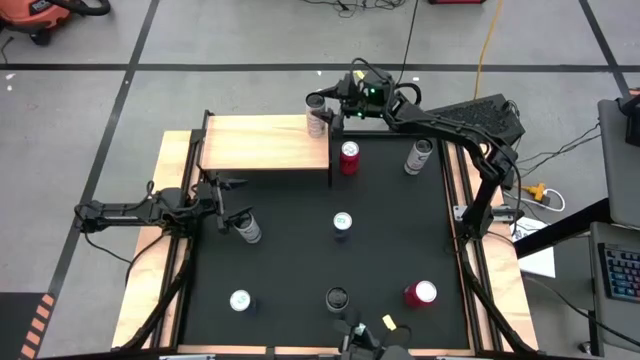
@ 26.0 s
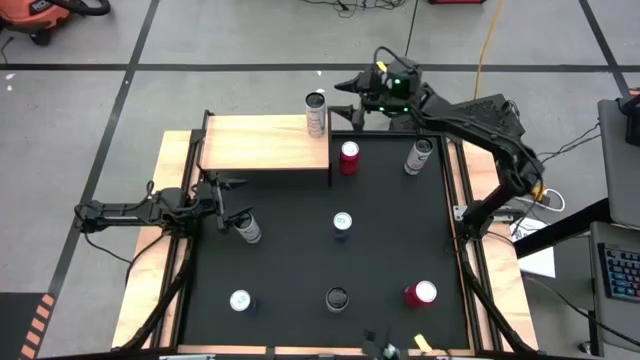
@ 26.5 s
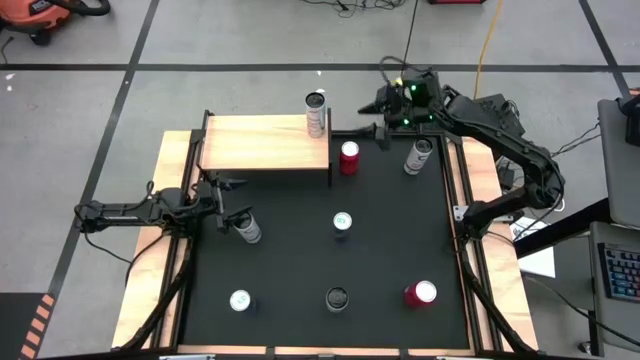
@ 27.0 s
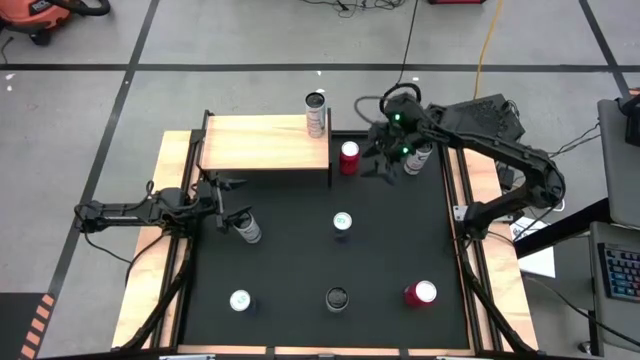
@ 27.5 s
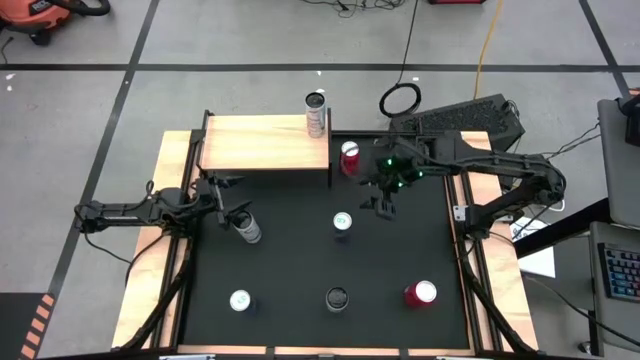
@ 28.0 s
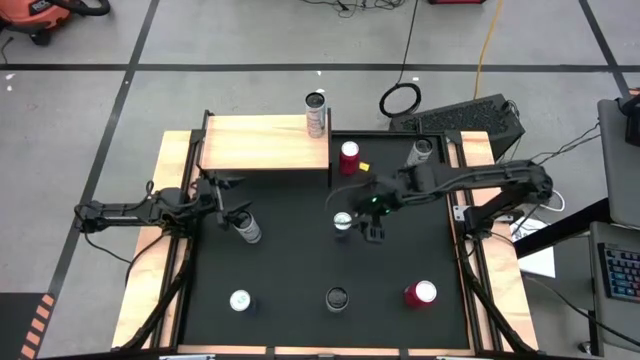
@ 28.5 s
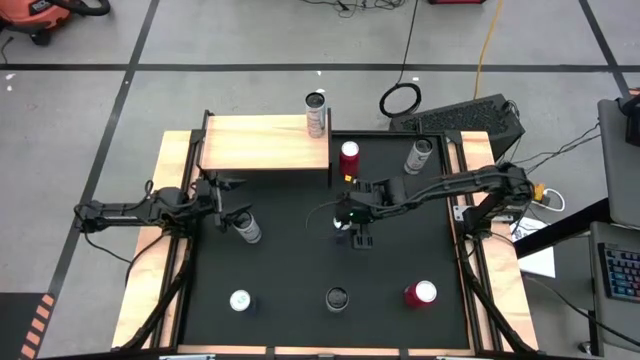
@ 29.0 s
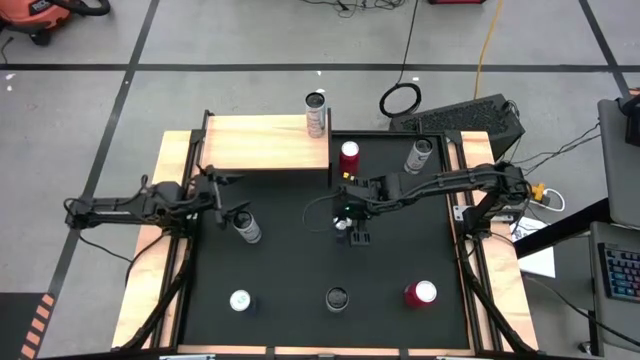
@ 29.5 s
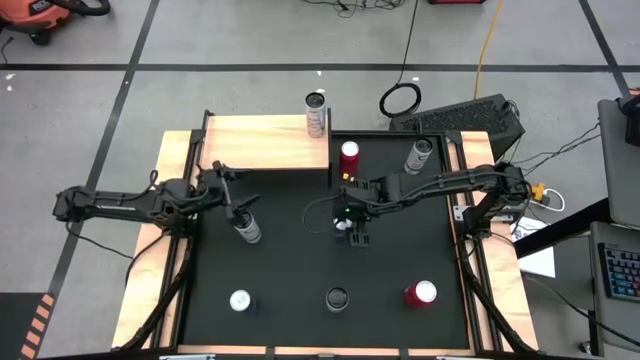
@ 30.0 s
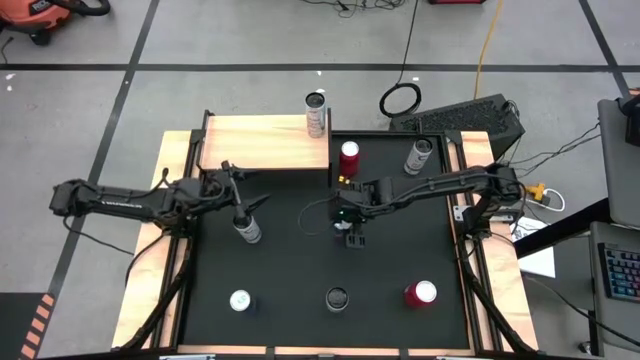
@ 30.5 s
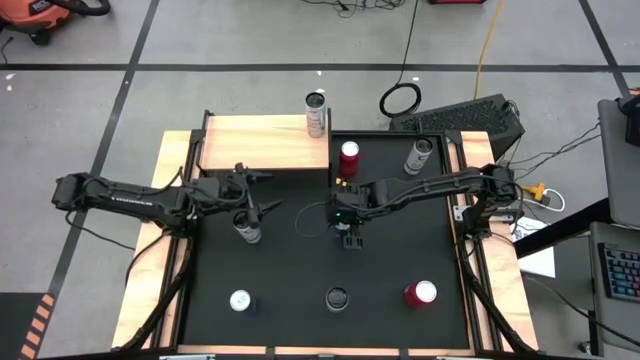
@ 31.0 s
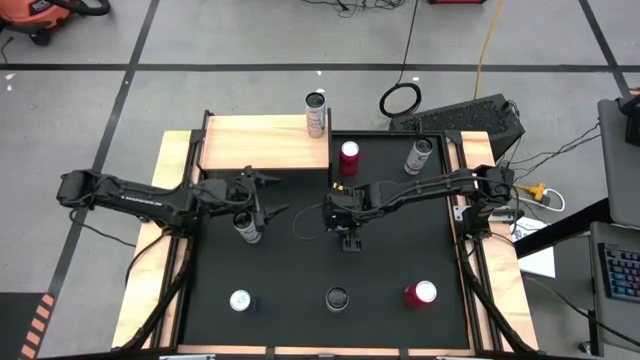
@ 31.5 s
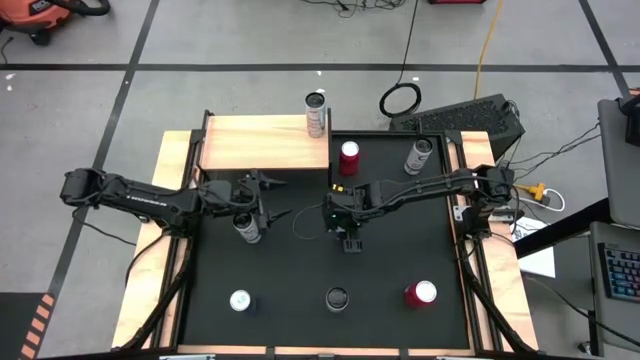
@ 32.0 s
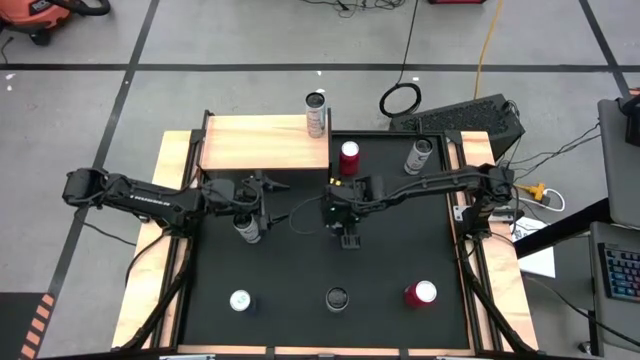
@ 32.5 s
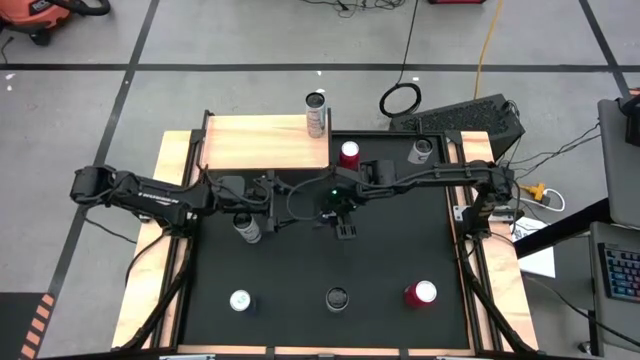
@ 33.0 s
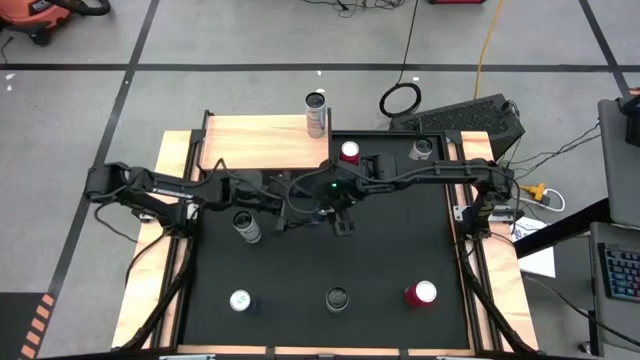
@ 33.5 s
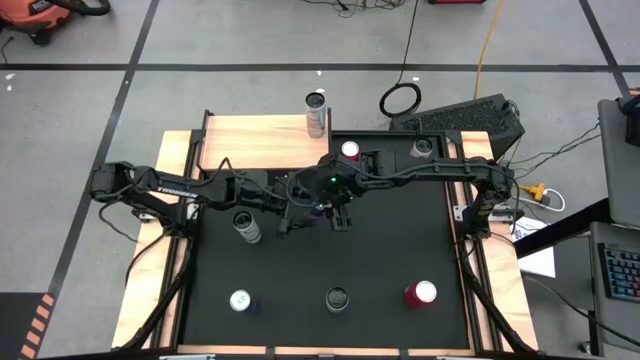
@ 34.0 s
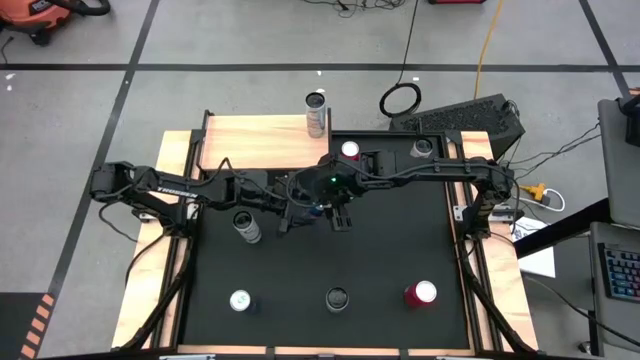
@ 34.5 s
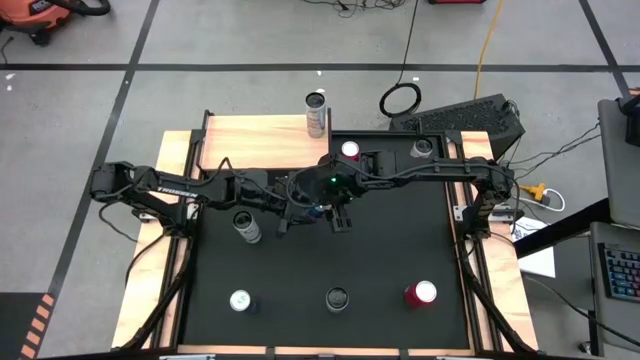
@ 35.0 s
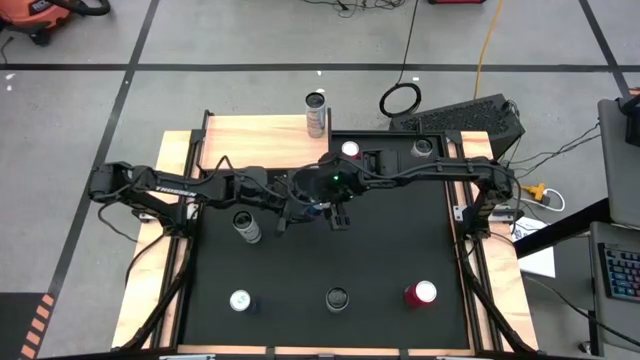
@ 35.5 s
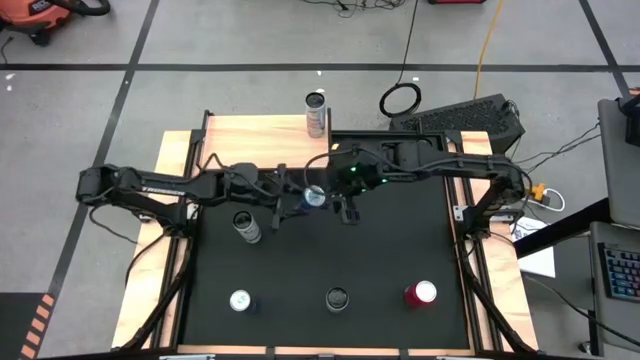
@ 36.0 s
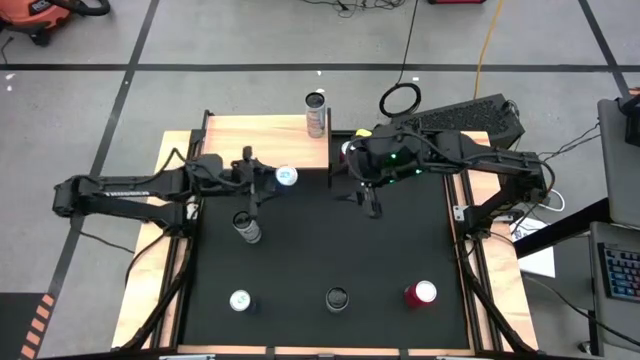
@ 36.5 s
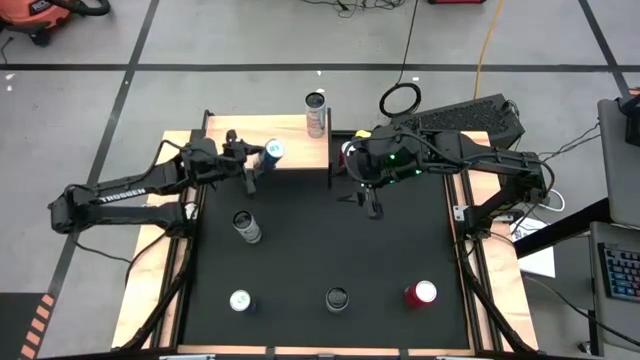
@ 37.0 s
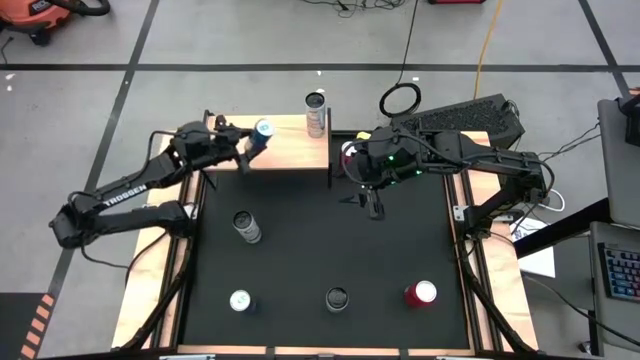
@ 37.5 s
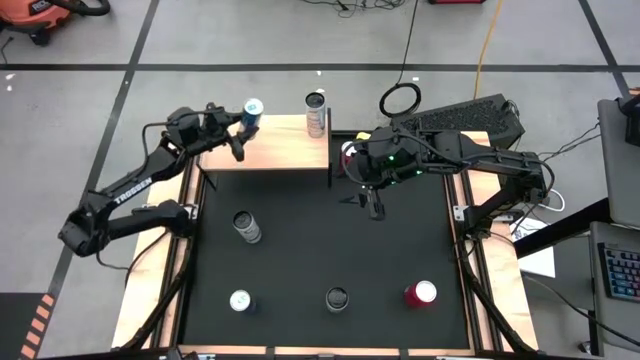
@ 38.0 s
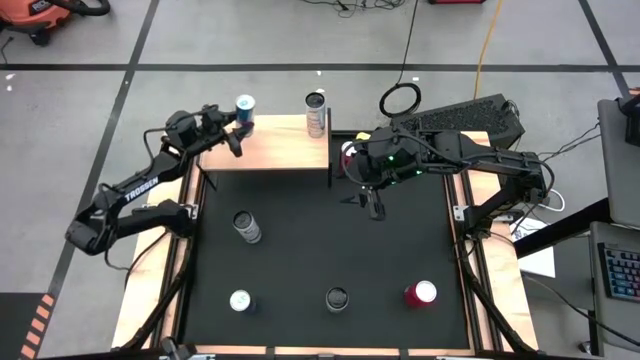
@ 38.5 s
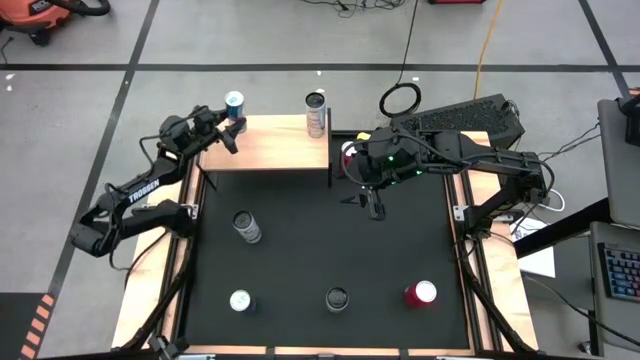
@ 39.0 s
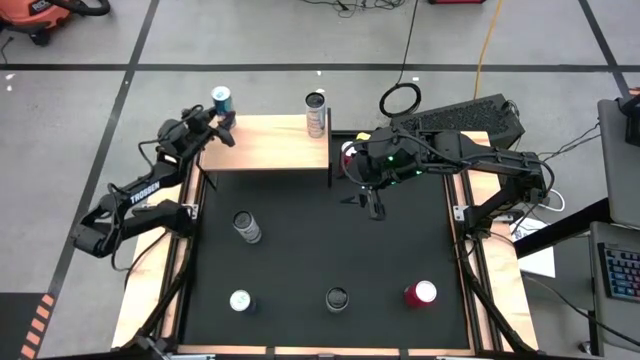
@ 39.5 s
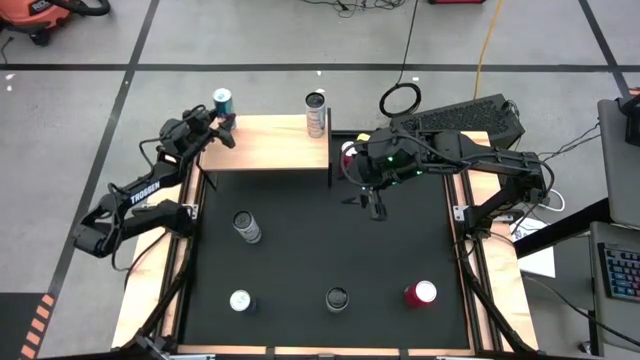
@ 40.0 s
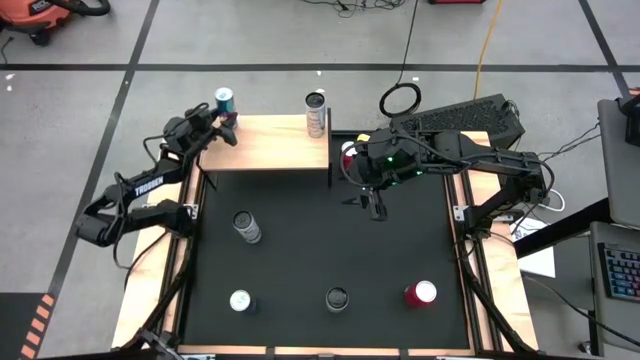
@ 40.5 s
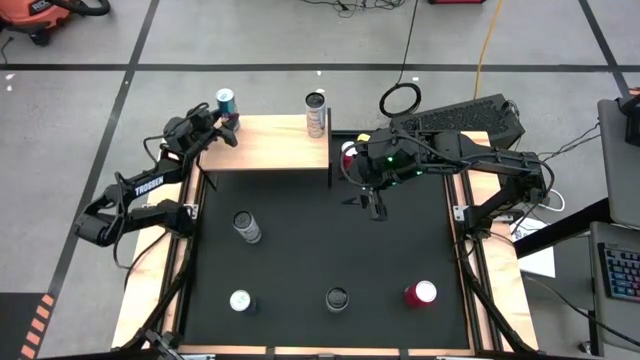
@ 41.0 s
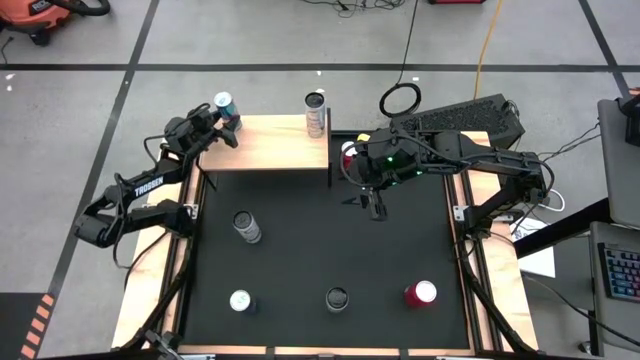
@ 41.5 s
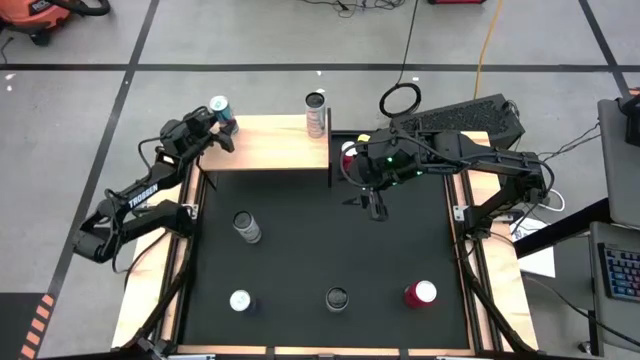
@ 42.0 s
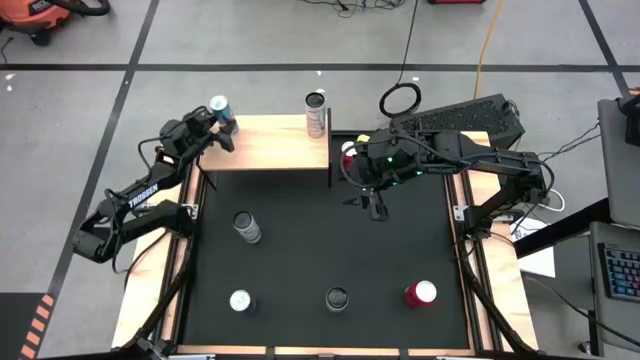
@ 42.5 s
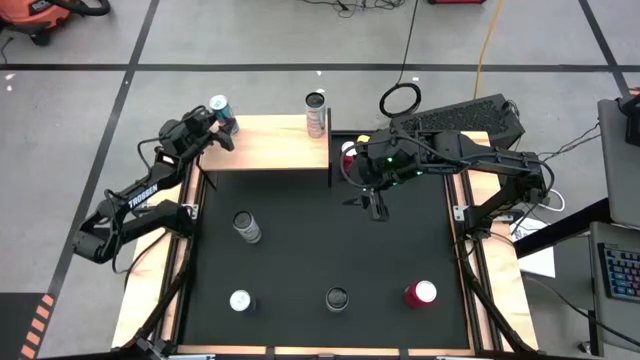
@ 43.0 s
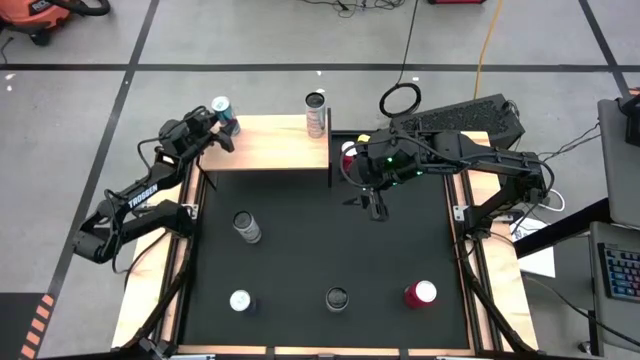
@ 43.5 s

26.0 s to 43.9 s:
Task: Place canned beverage on shelf
Put the top blue soda can on the shelf
